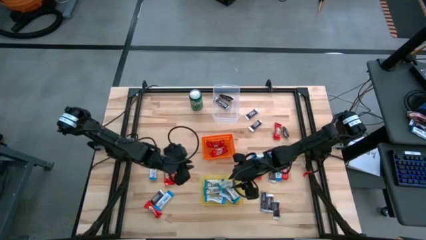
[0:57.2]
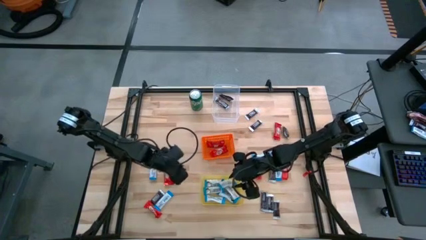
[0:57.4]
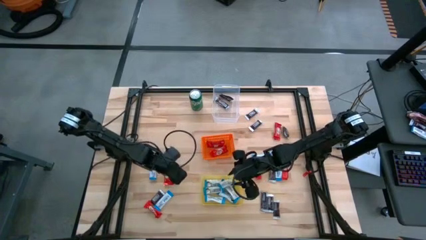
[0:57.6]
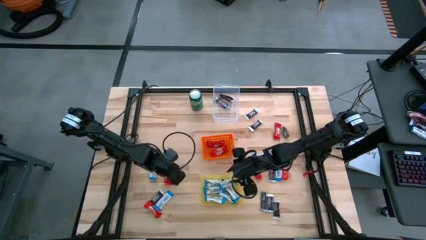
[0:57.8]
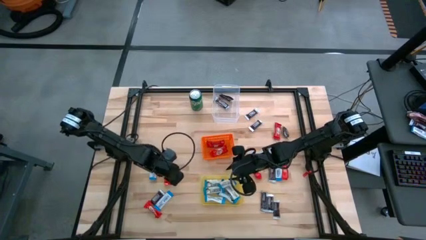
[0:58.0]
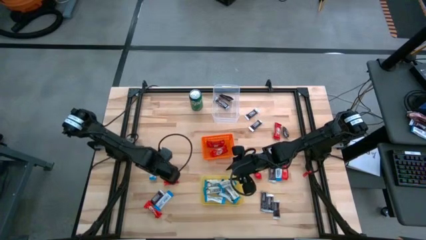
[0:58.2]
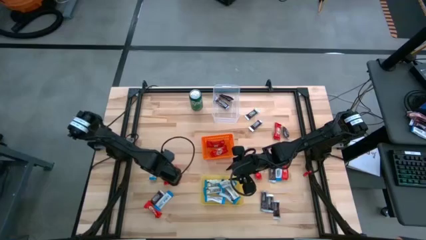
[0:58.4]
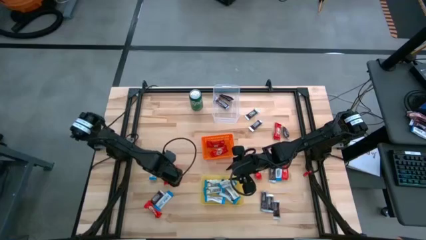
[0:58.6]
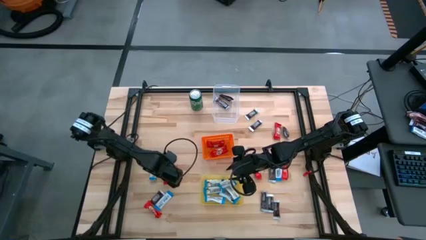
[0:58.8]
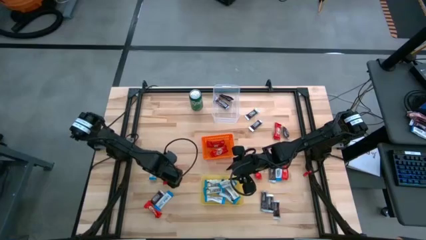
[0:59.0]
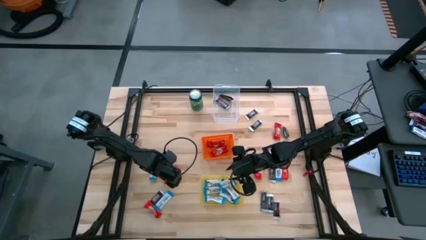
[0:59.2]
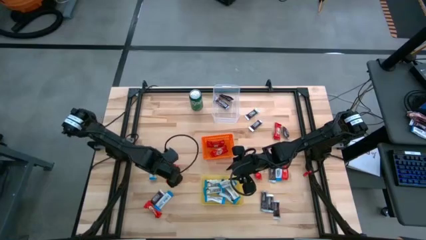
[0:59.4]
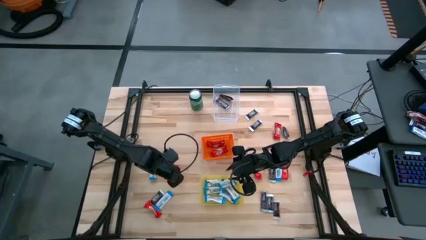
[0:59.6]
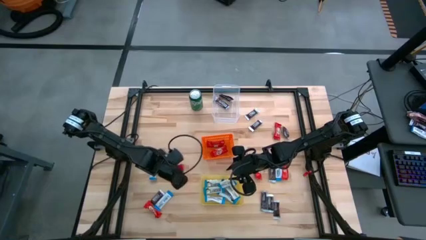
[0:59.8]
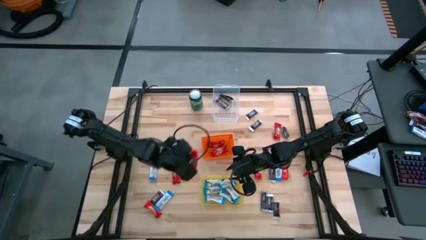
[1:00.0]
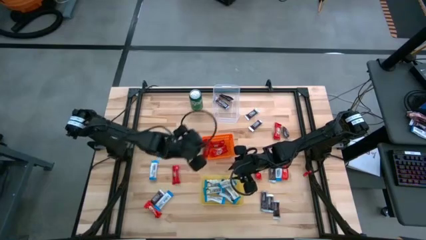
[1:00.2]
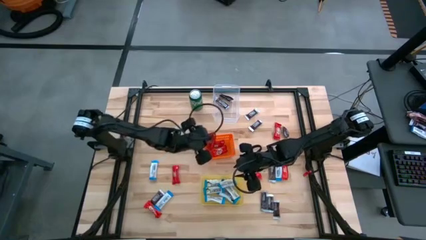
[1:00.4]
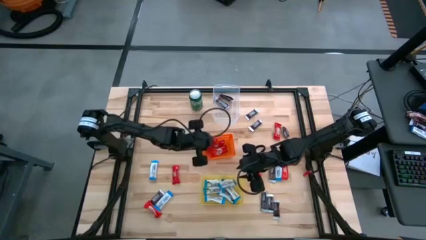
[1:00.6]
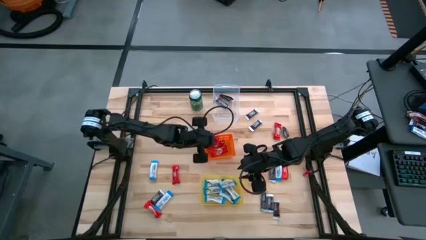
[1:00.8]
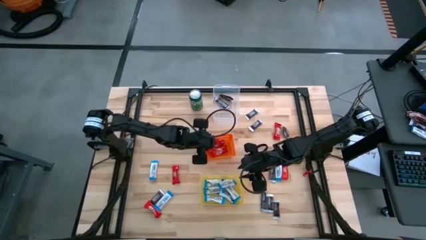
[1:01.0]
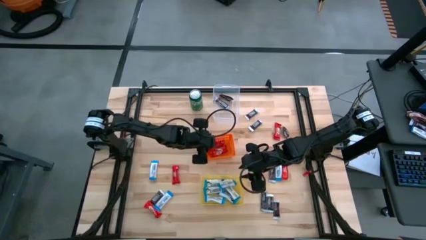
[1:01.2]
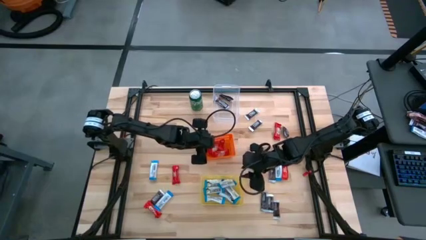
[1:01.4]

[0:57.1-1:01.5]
Task: Sort candy
Put the red candy into the orange bin

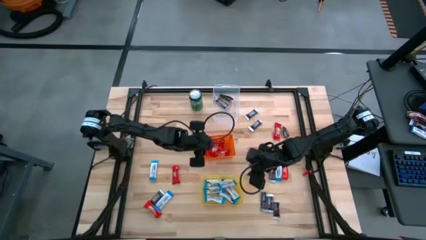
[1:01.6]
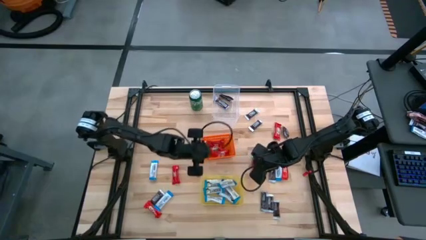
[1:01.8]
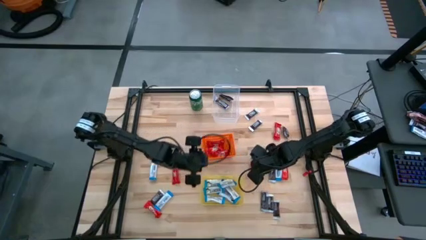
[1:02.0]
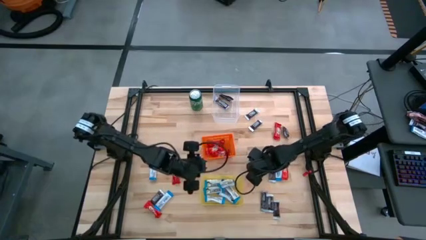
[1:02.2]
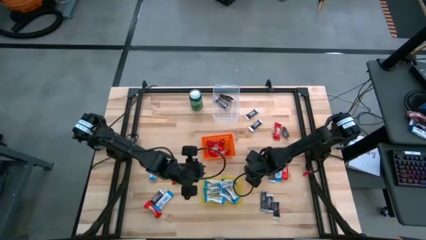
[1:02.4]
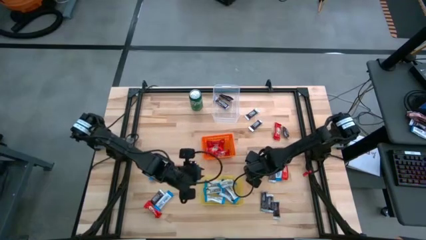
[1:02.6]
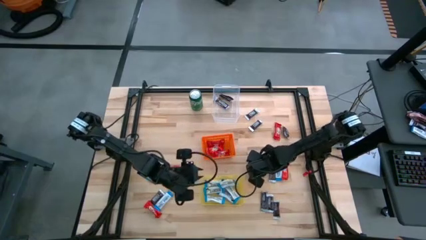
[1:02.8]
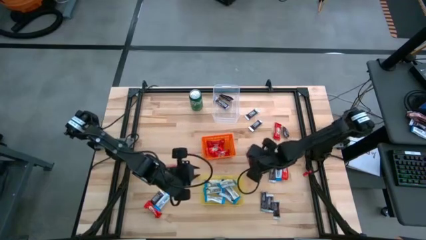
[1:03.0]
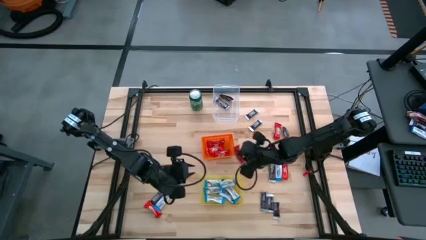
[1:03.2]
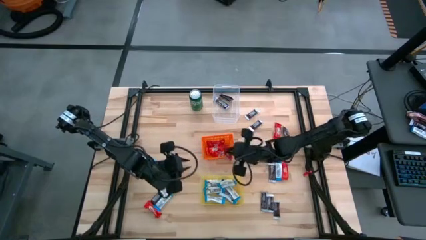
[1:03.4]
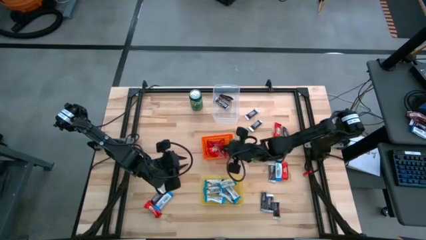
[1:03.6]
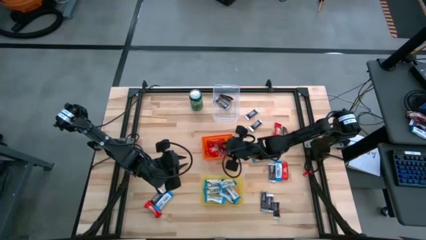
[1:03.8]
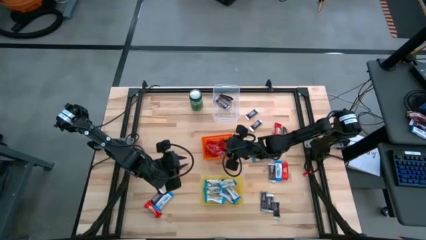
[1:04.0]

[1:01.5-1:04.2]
Put the red candy into the orange bin

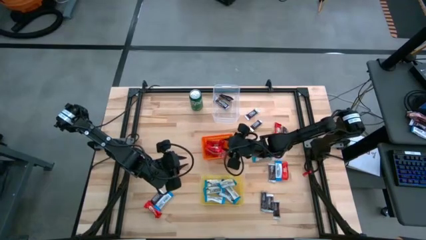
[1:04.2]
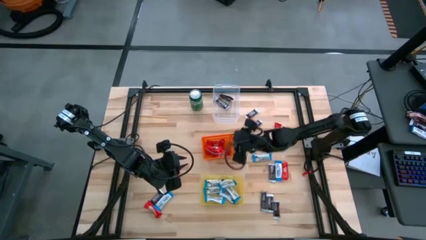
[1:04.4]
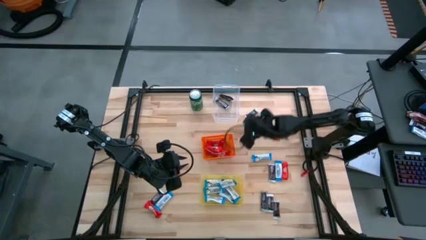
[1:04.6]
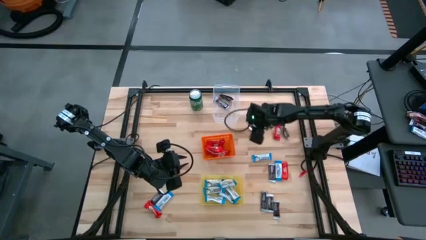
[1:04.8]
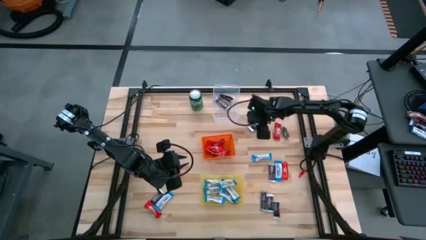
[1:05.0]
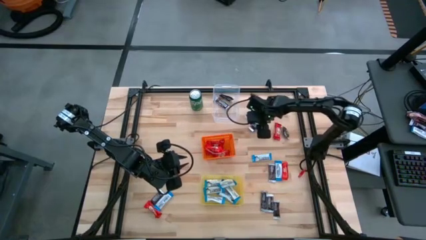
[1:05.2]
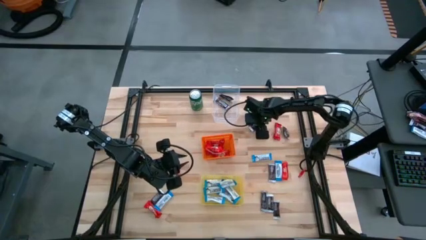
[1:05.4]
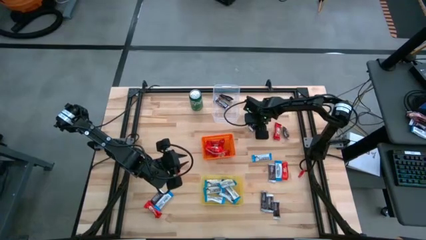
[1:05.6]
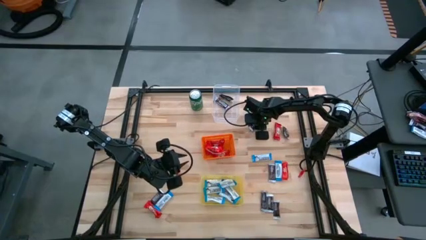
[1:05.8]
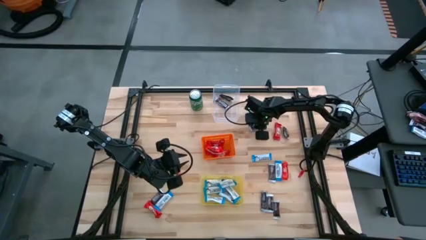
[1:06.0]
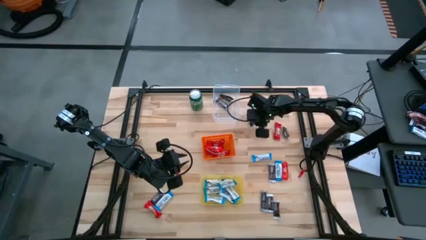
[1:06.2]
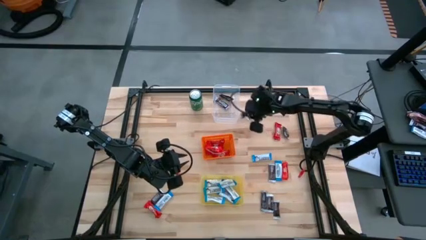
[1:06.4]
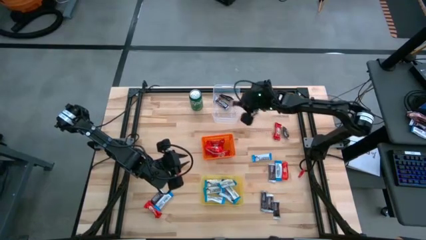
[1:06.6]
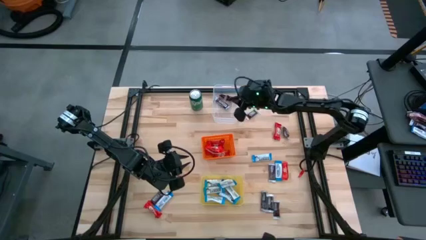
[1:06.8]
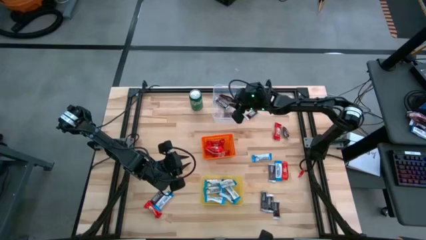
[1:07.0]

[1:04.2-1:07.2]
Put the black candy into the transparent bin

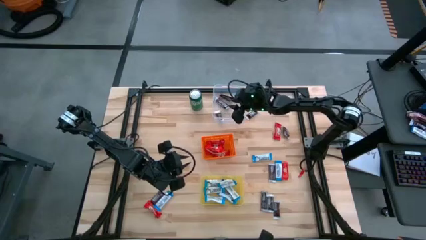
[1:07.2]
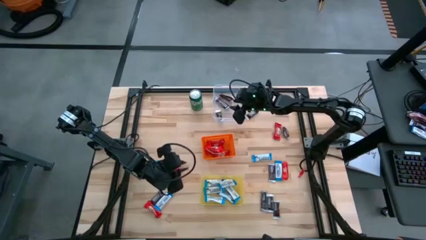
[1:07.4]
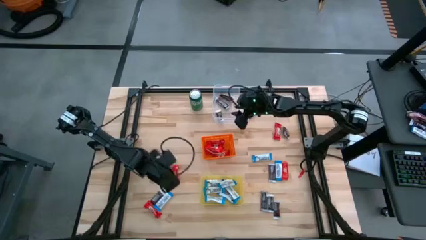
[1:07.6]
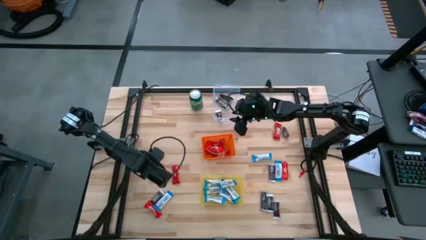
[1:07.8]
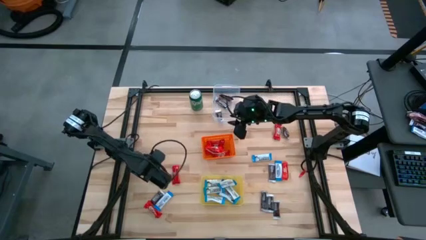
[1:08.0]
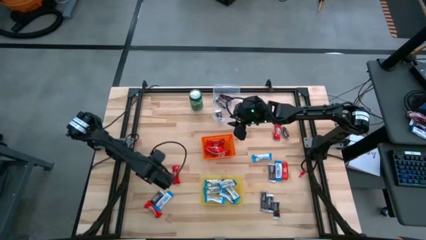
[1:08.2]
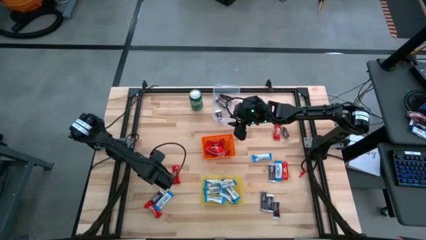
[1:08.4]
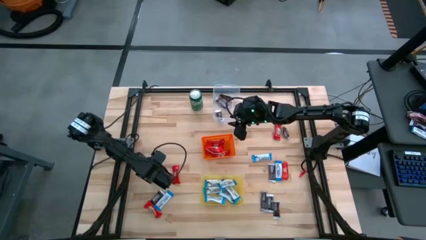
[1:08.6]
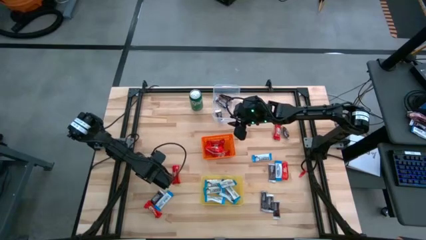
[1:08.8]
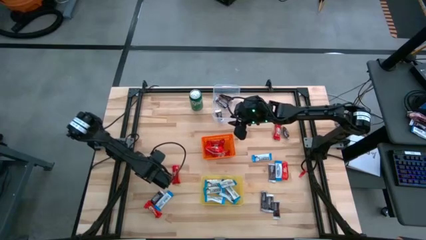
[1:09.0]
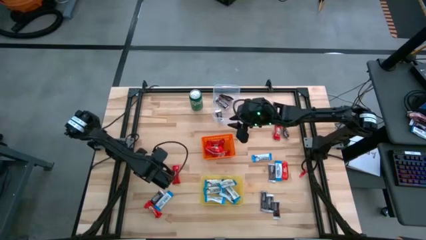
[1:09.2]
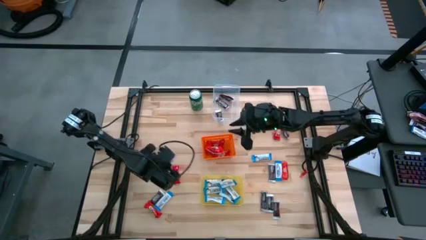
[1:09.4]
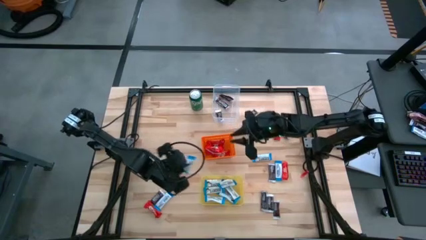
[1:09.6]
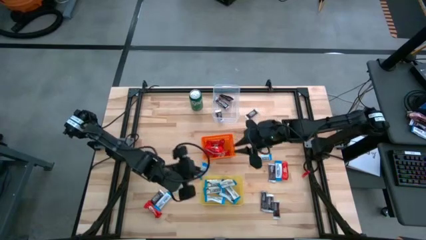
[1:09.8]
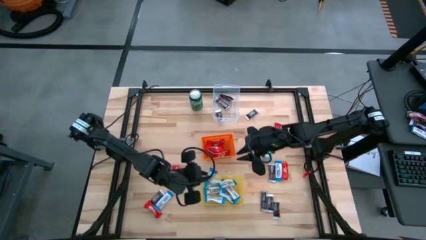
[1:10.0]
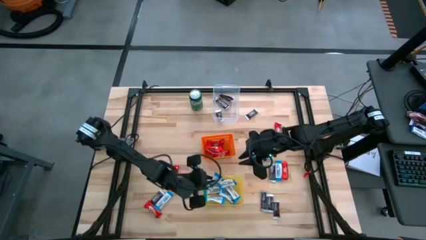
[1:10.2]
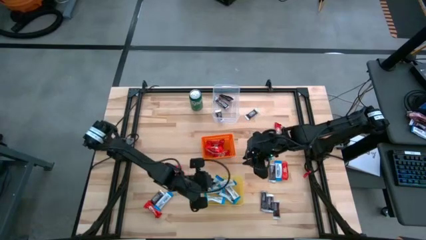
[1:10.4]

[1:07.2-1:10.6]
Put the white candy into the yellow bin

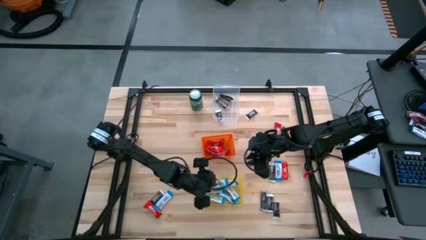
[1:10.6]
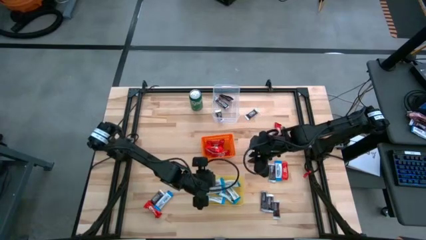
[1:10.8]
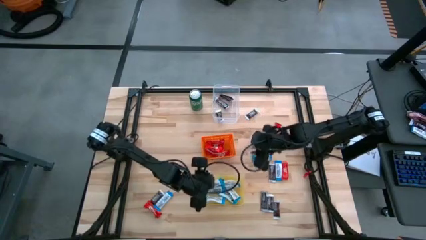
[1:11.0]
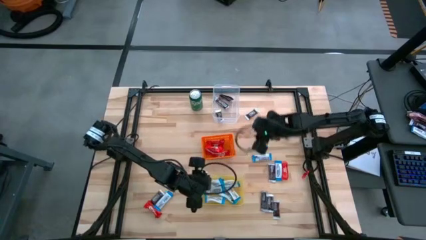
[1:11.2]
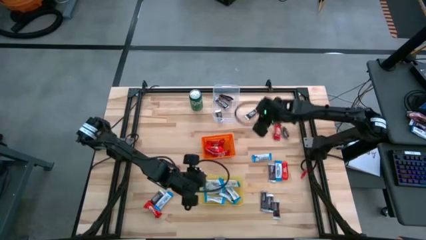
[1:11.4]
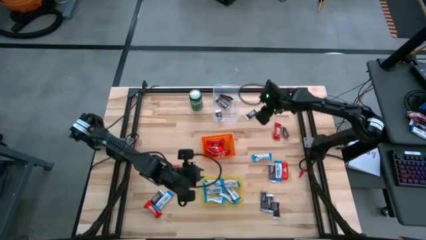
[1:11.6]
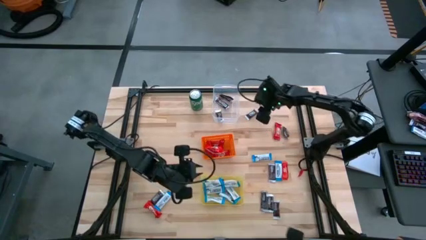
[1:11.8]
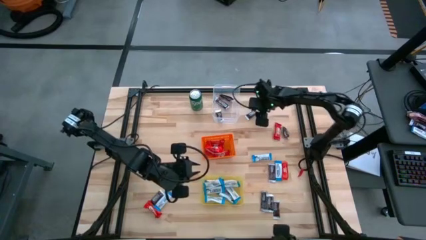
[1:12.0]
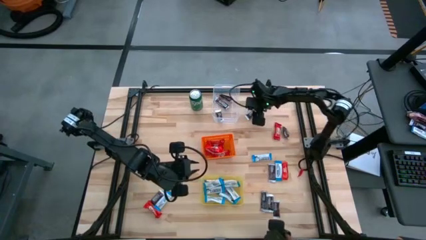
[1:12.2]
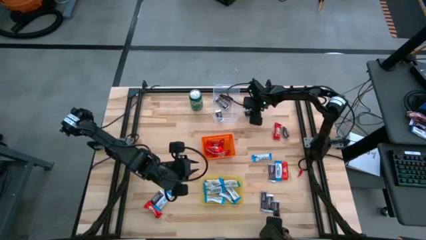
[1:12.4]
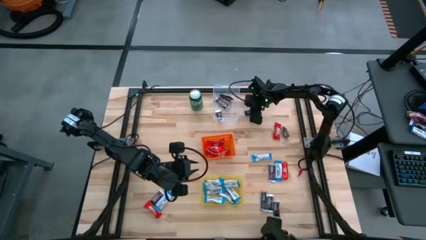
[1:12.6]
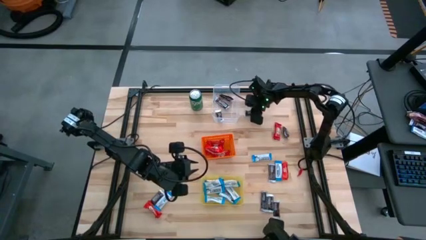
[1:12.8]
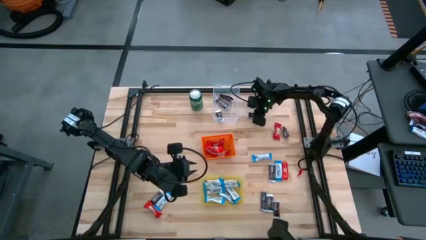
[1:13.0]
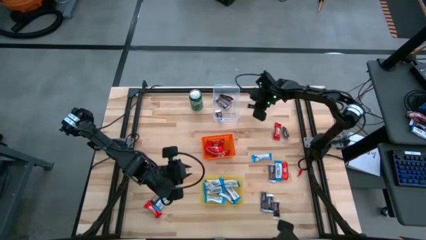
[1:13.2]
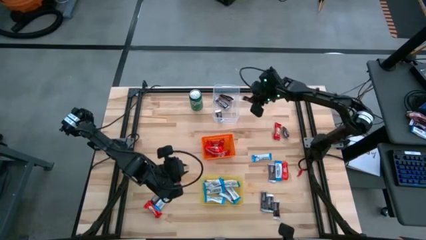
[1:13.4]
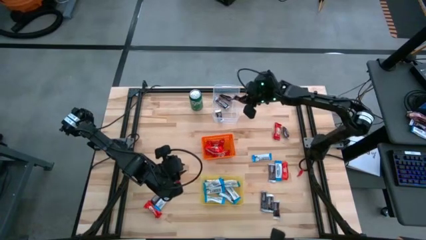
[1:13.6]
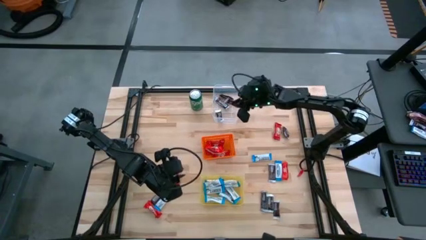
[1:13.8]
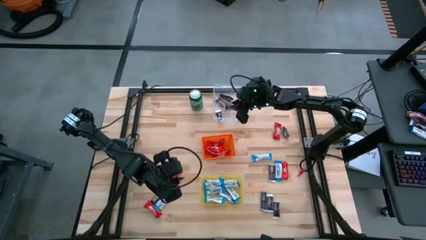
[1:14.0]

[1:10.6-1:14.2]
Put the black candy into the transparent bin
